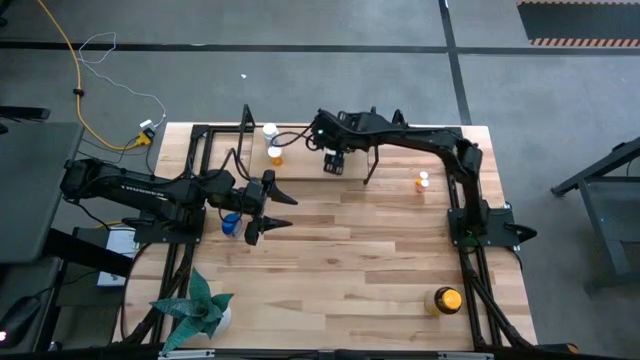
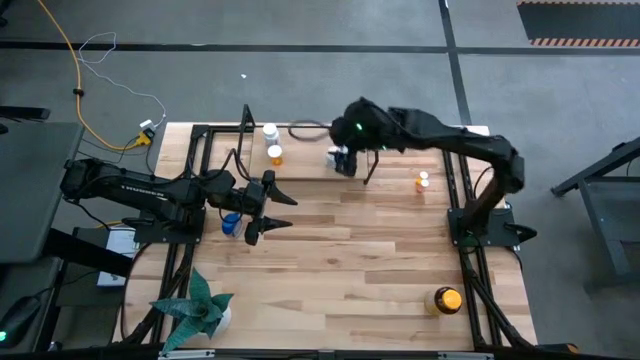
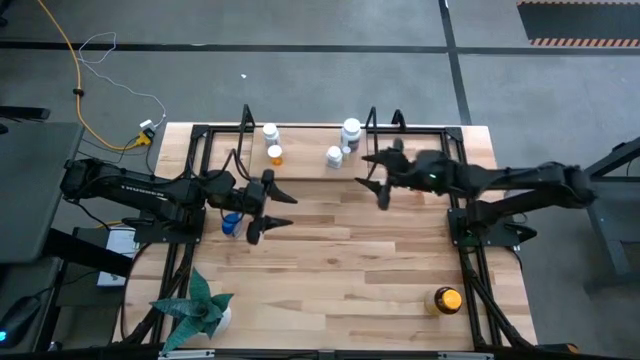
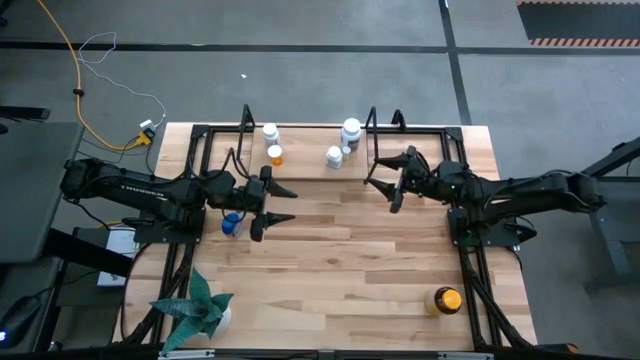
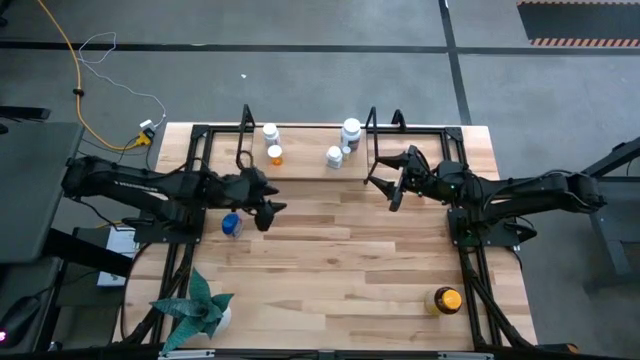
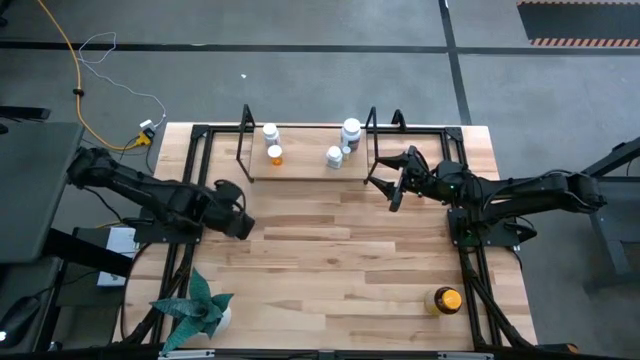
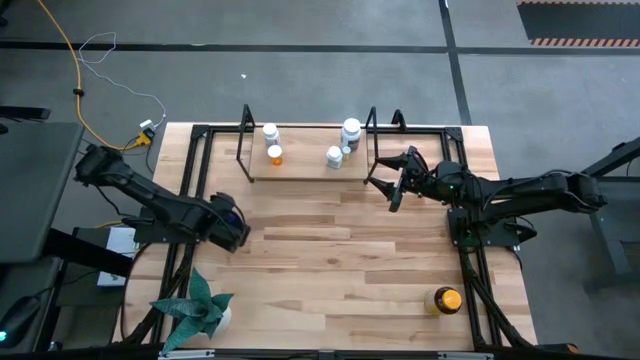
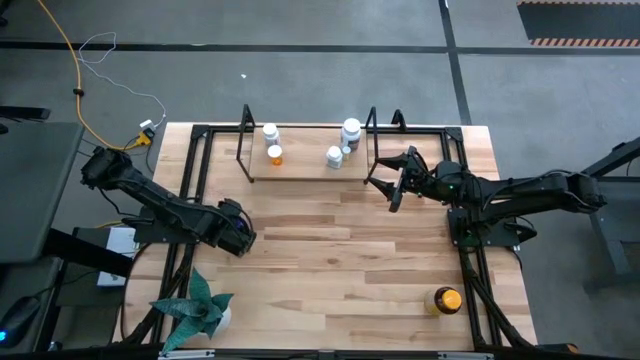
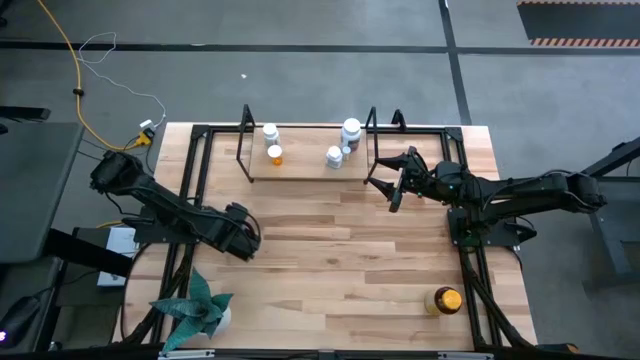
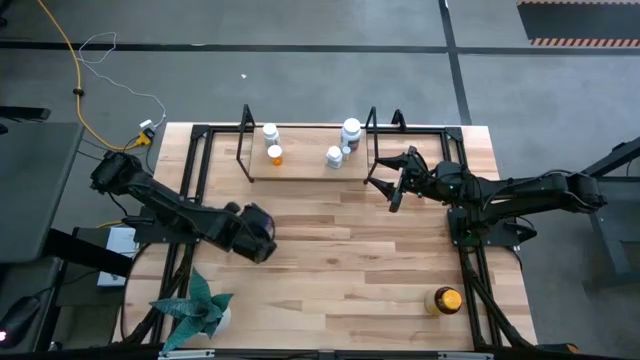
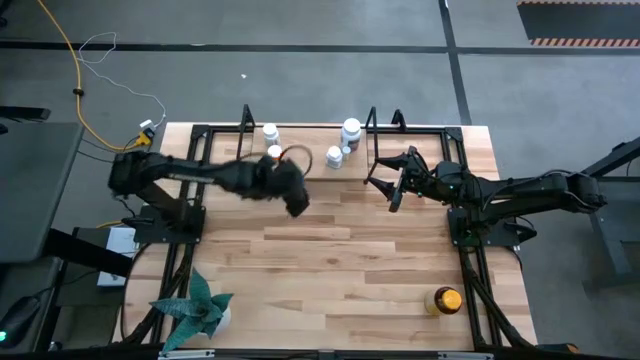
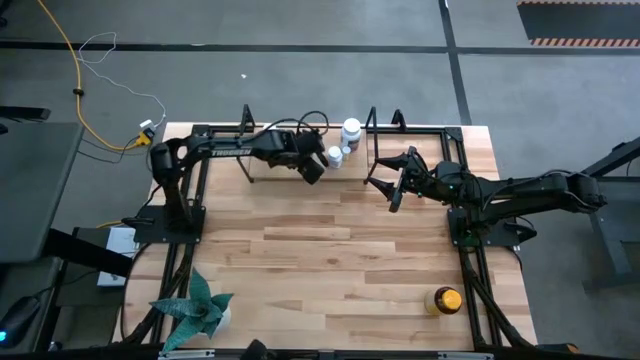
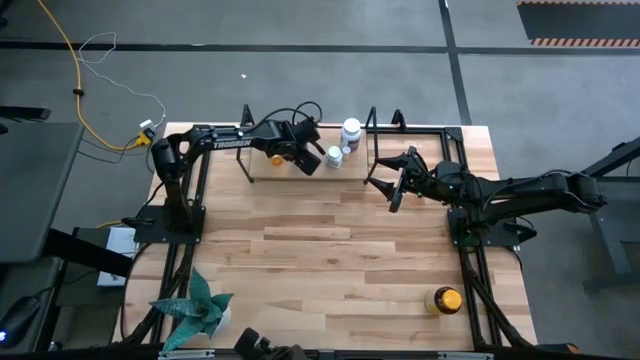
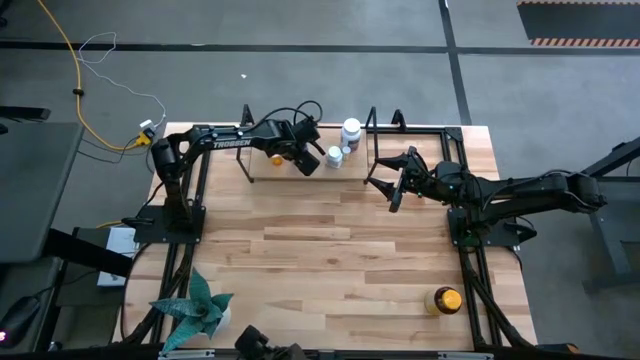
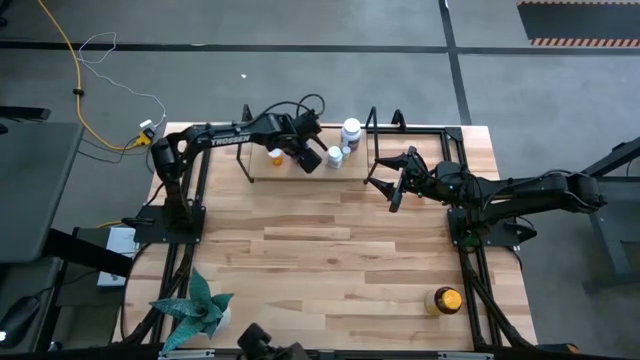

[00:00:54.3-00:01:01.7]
Task: Pick and place medicine bottles onto shelf by color
Put the blue pill bottle on the shelf

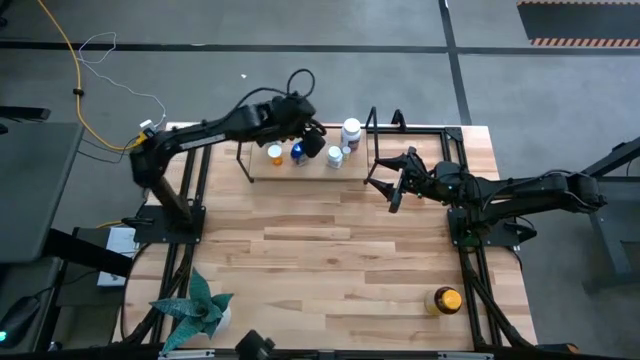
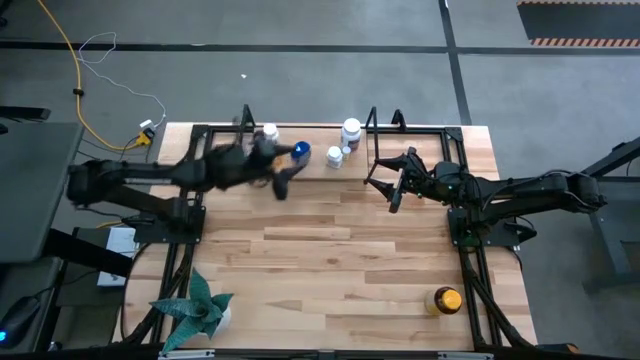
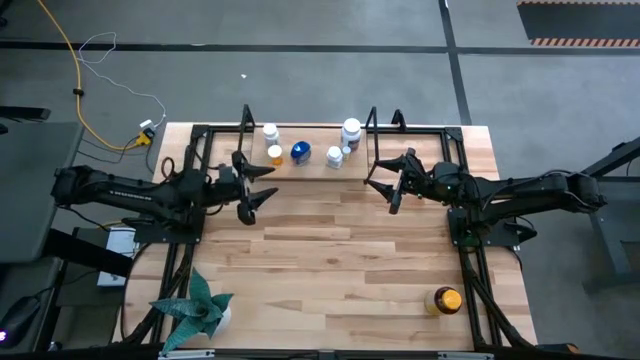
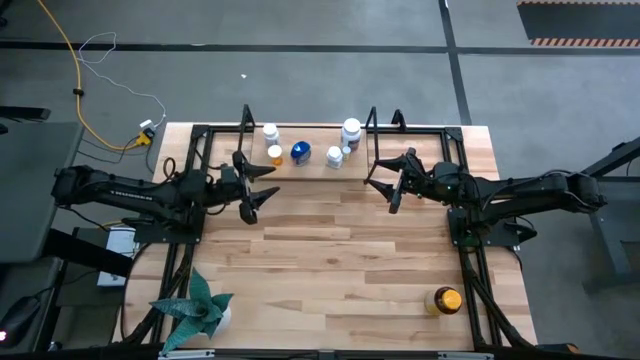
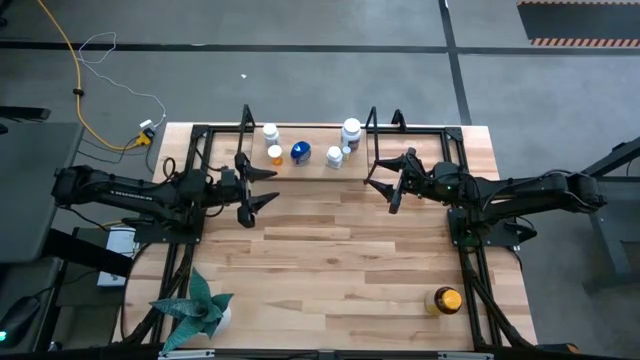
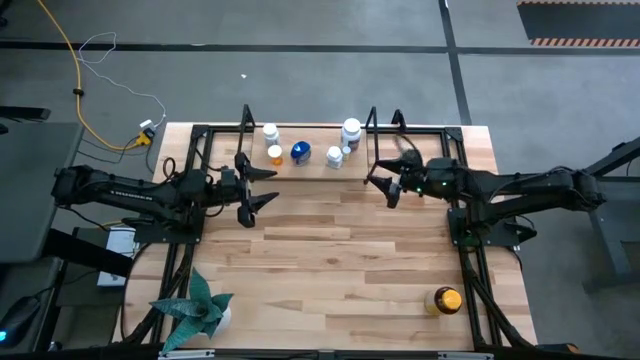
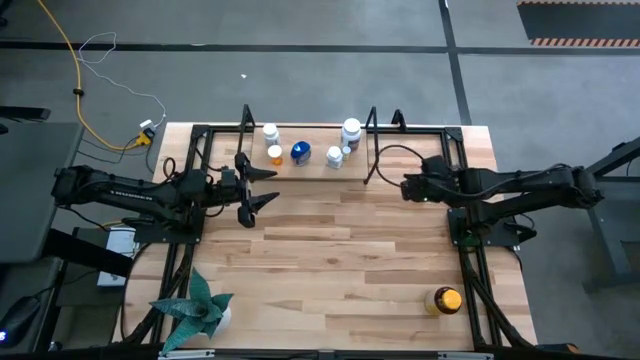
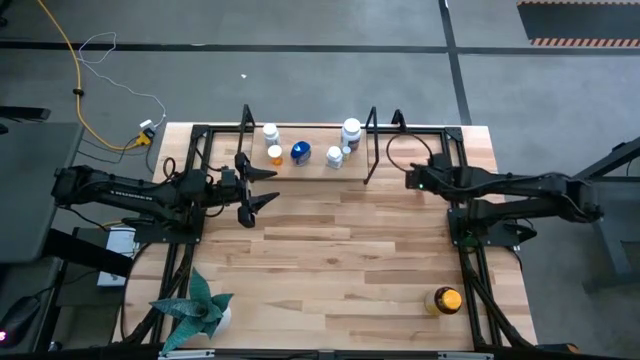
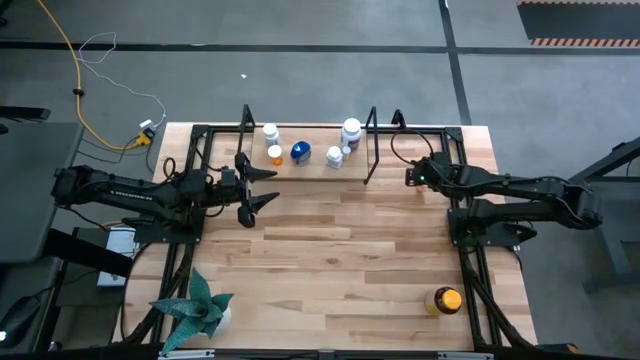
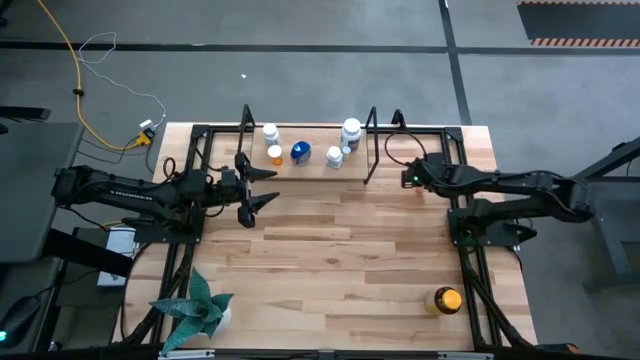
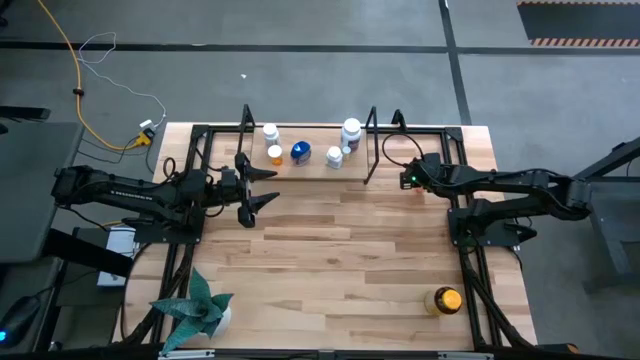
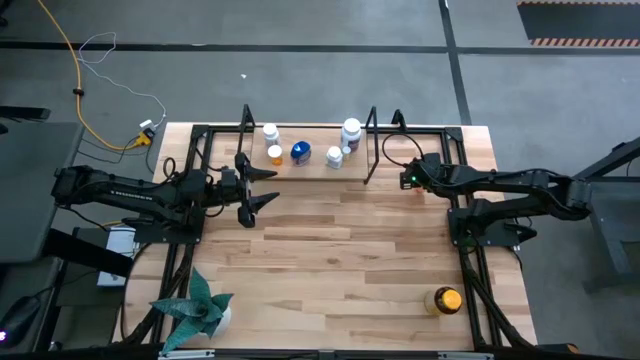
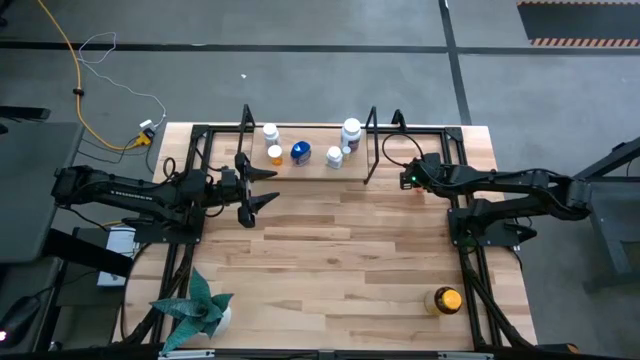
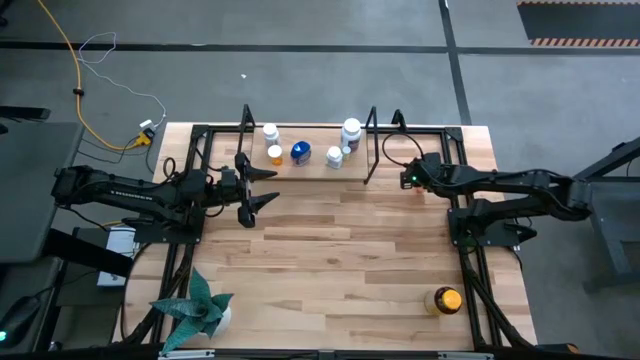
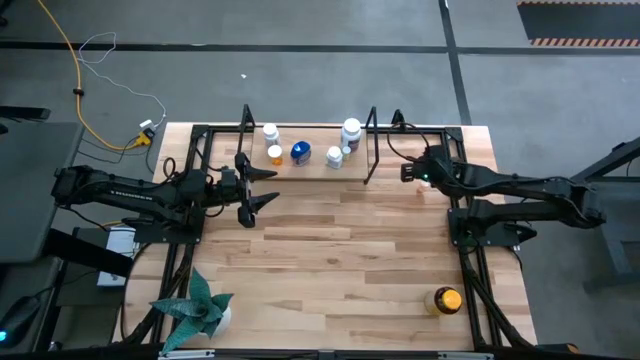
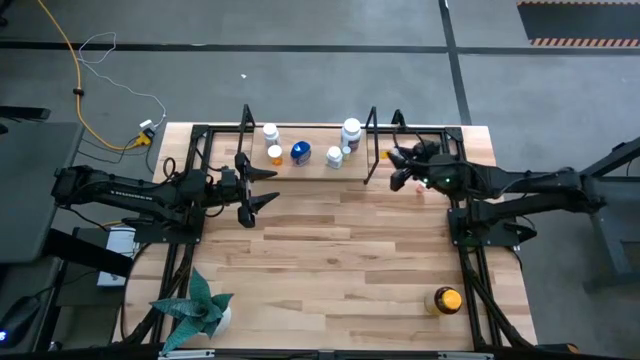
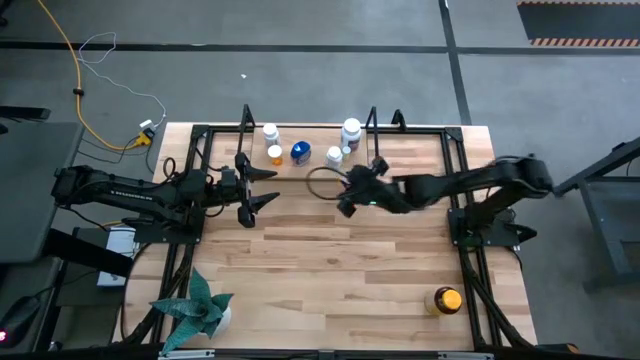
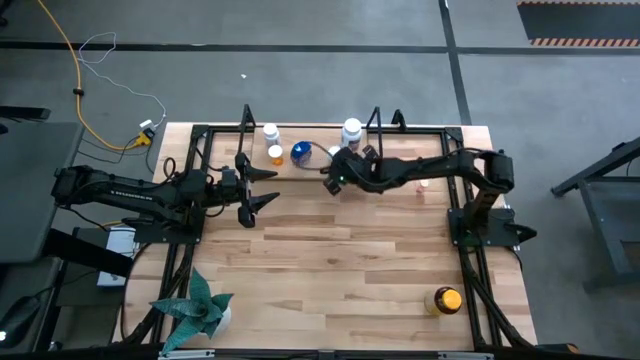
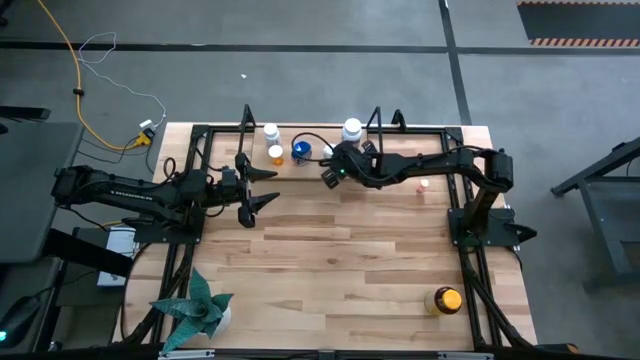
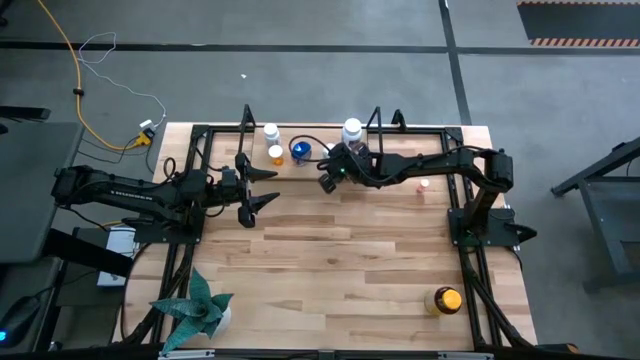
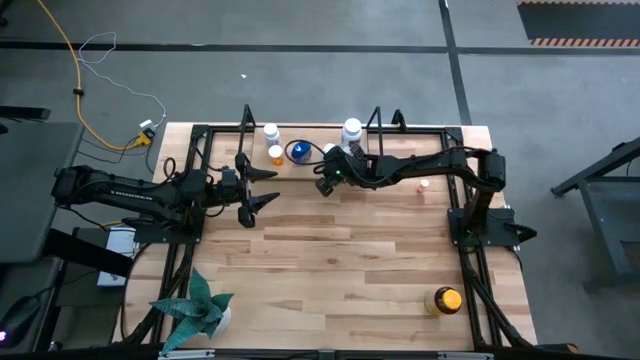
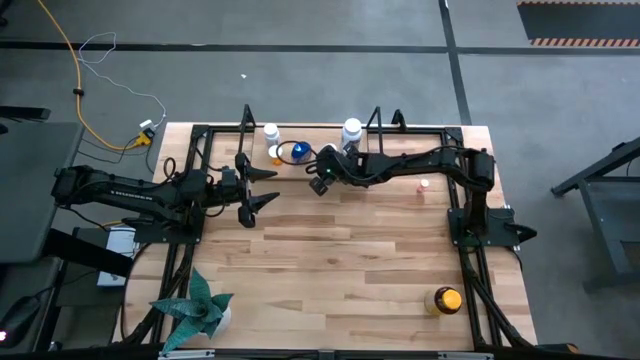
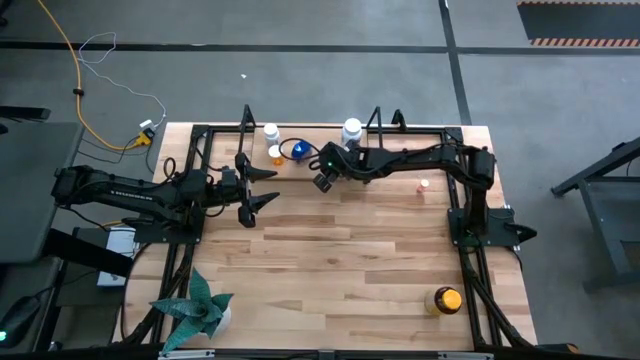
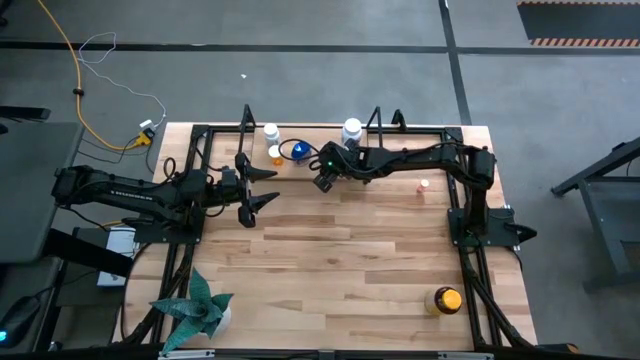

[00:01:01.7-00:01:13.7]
Put the orange pill bottle on the shelf

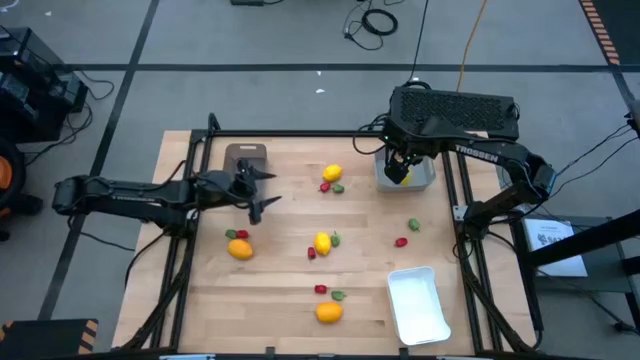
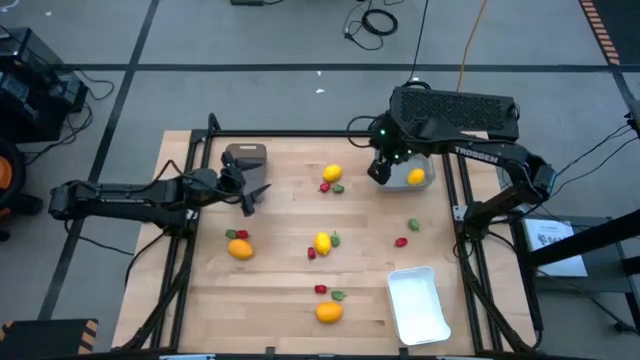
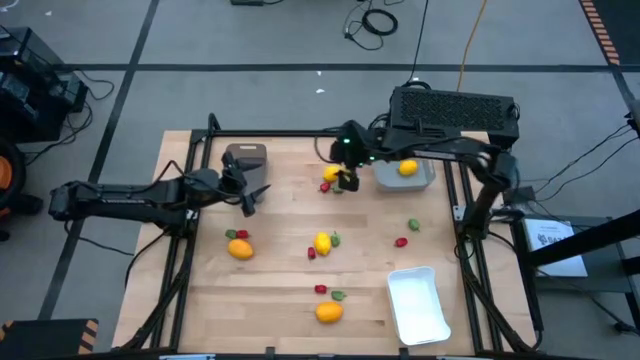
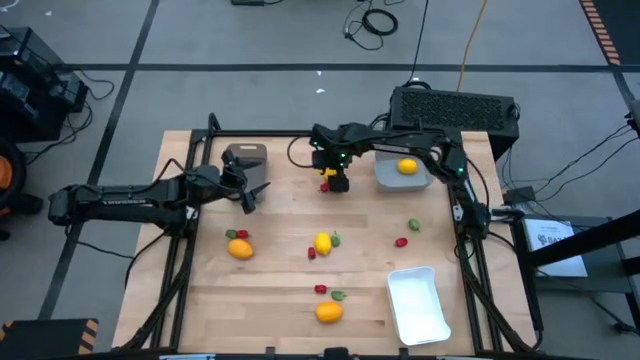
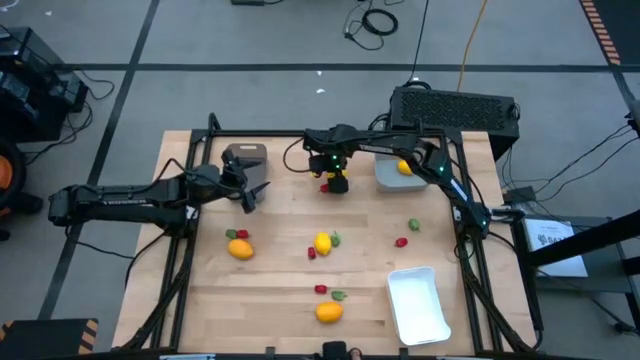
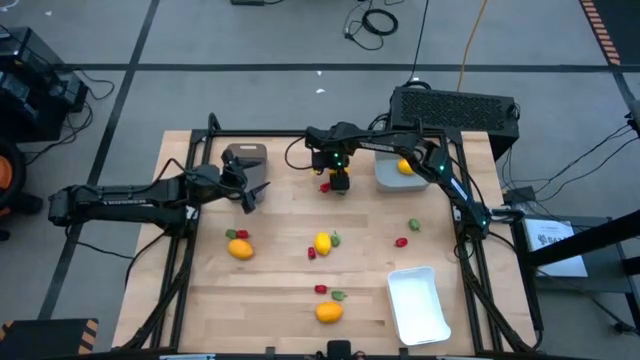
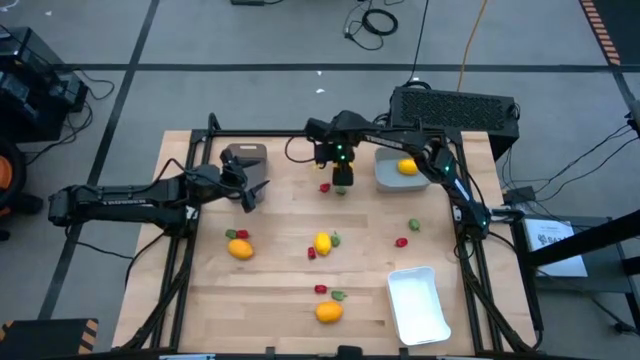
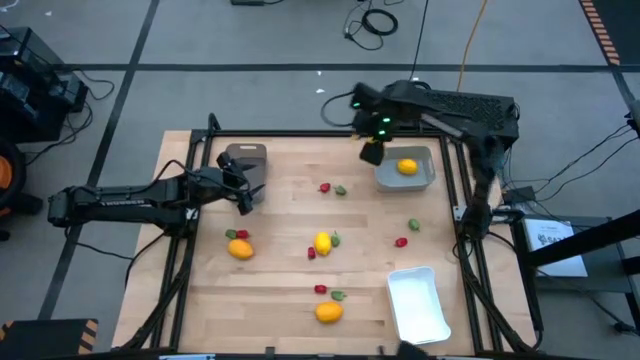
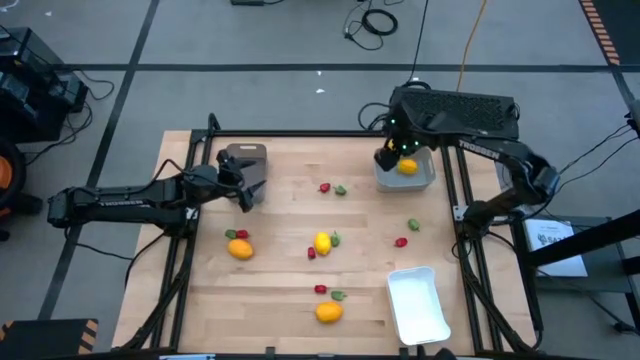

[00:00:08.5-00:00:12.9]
Task: Sort produce into baskets
Put the center top yellow lemon into the gray bin
